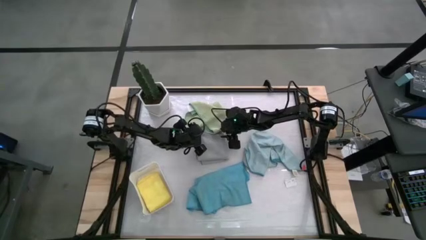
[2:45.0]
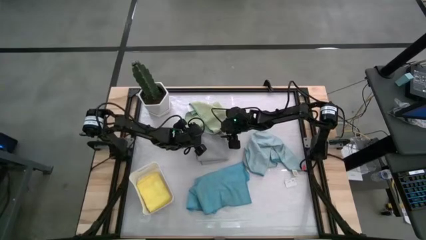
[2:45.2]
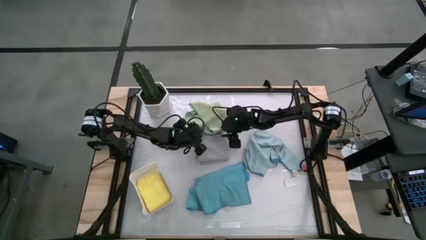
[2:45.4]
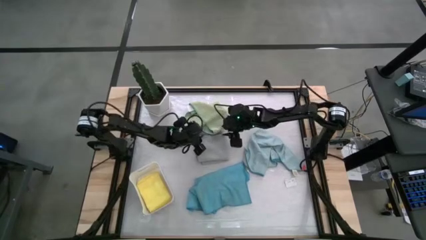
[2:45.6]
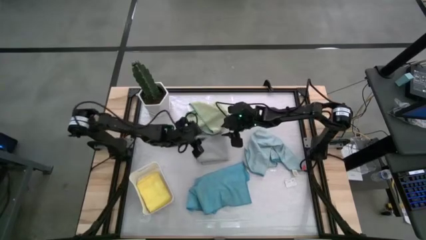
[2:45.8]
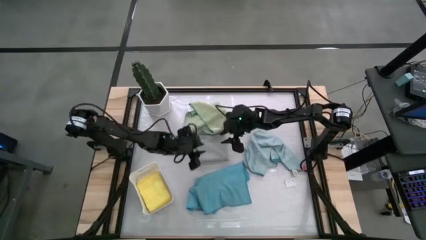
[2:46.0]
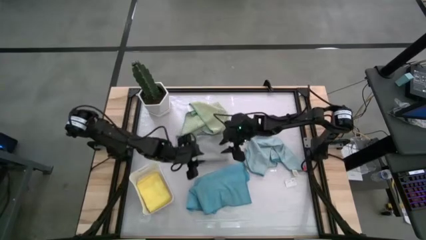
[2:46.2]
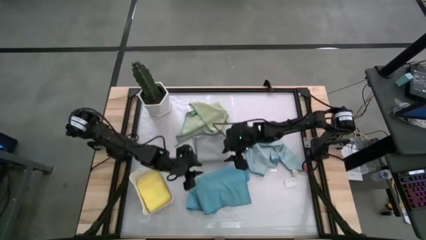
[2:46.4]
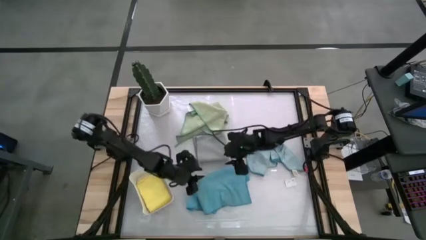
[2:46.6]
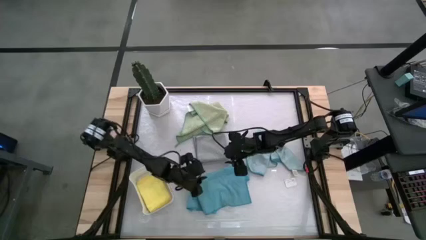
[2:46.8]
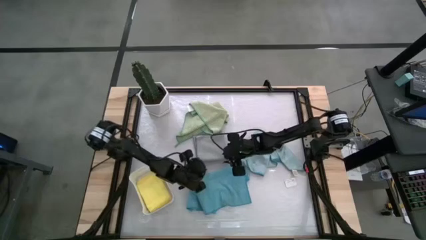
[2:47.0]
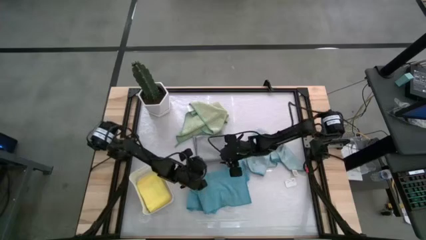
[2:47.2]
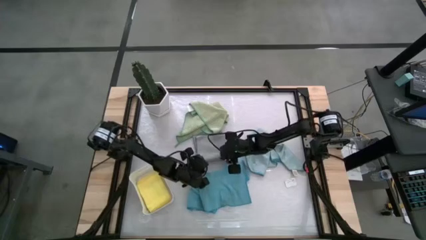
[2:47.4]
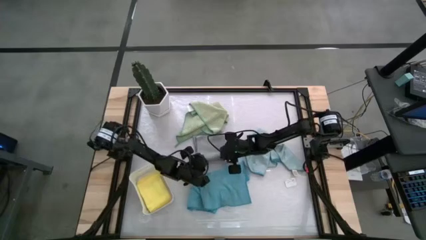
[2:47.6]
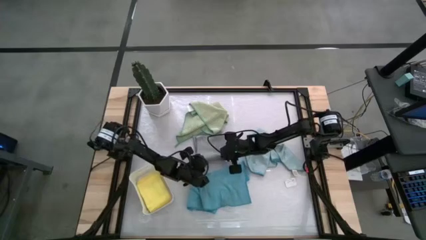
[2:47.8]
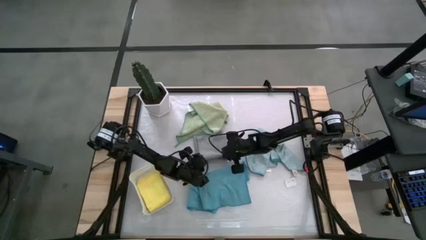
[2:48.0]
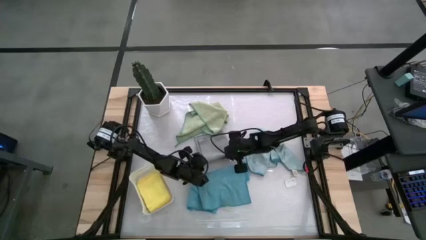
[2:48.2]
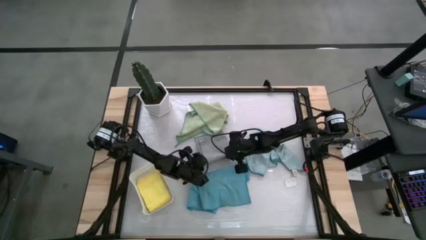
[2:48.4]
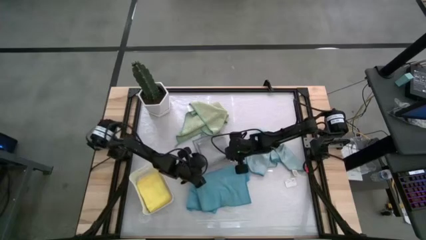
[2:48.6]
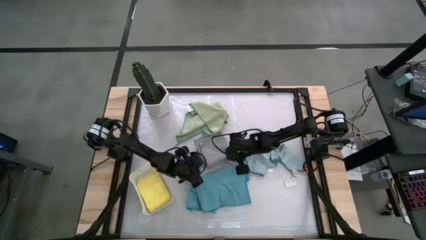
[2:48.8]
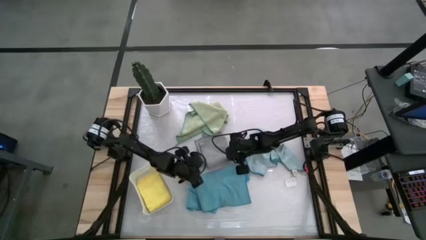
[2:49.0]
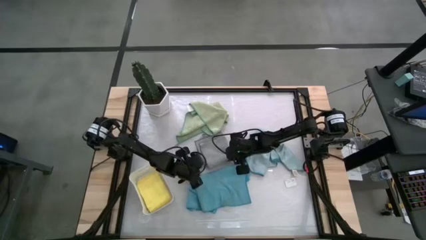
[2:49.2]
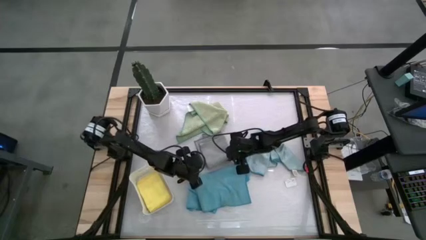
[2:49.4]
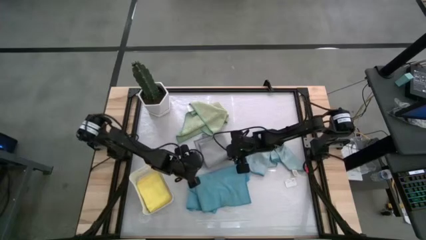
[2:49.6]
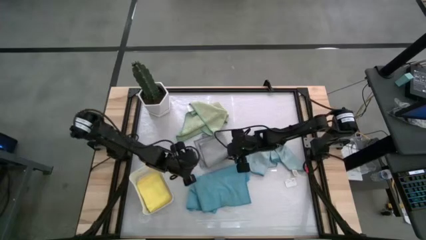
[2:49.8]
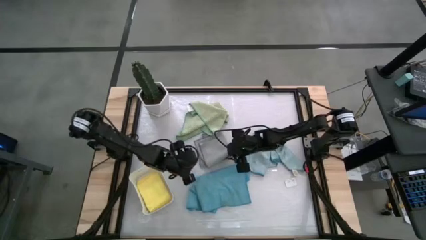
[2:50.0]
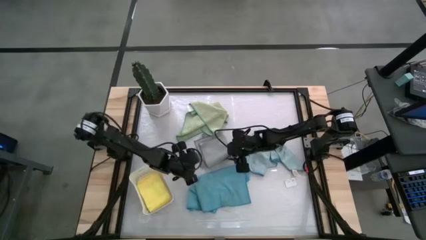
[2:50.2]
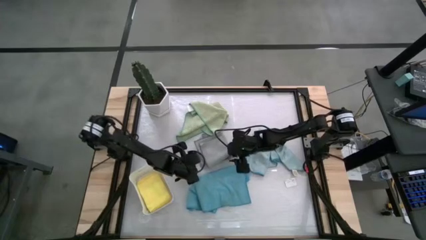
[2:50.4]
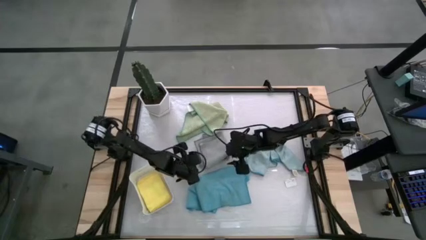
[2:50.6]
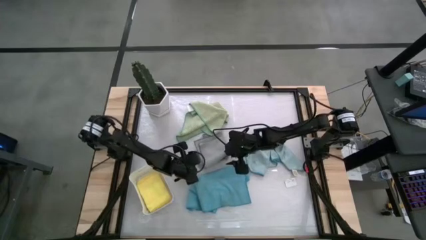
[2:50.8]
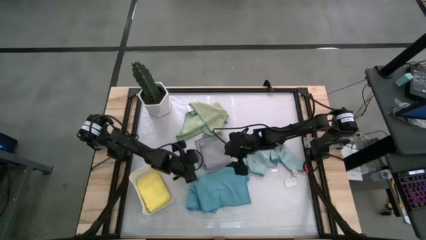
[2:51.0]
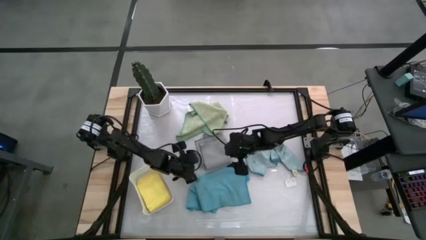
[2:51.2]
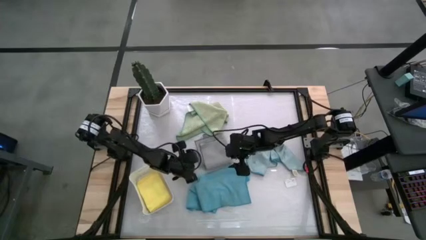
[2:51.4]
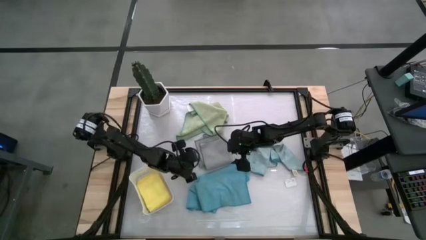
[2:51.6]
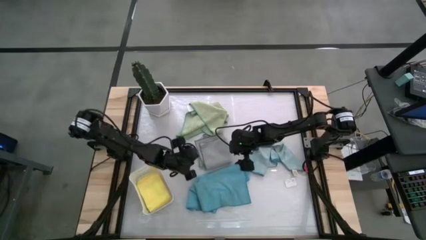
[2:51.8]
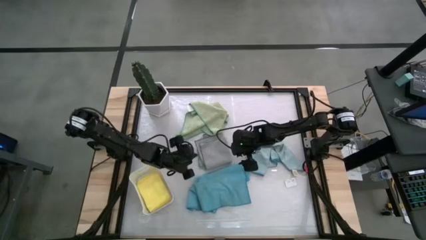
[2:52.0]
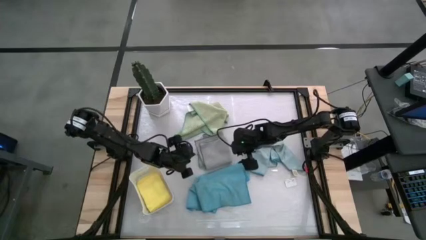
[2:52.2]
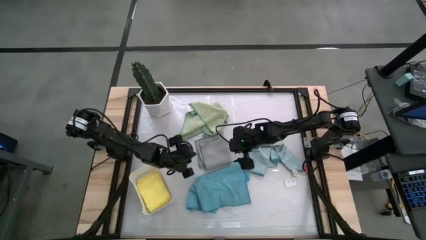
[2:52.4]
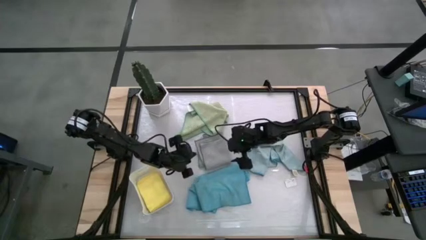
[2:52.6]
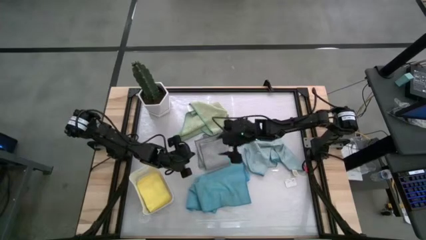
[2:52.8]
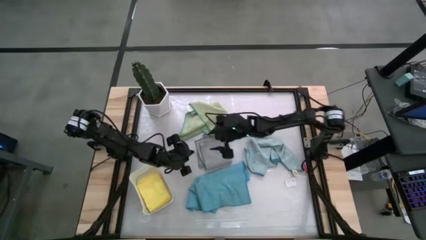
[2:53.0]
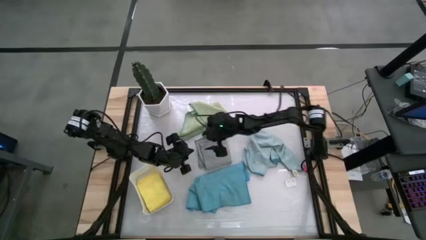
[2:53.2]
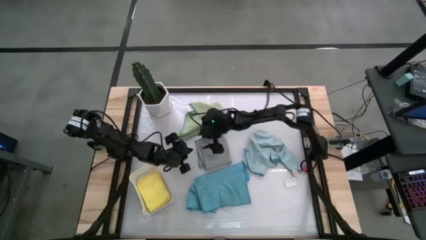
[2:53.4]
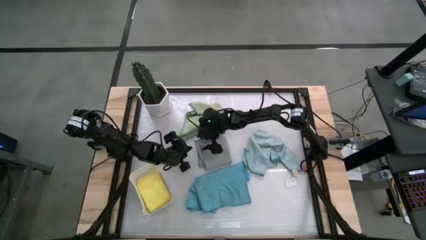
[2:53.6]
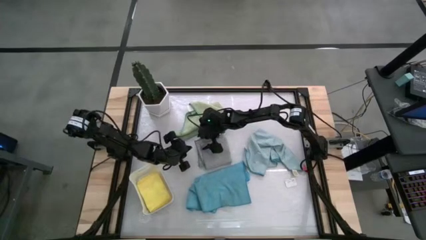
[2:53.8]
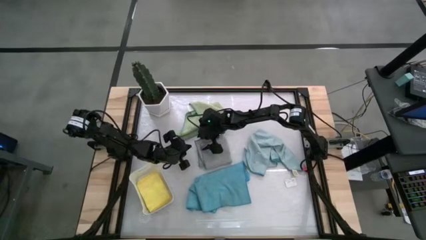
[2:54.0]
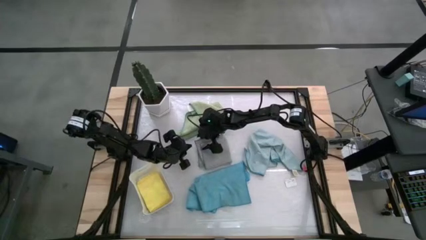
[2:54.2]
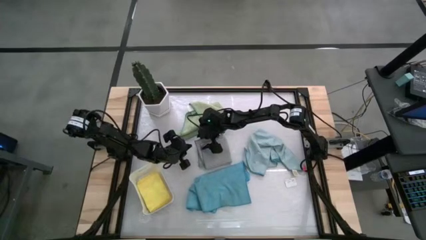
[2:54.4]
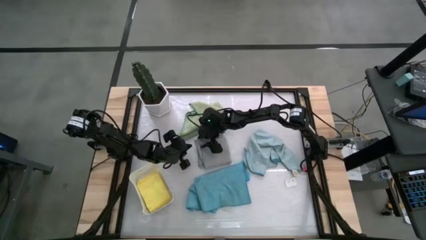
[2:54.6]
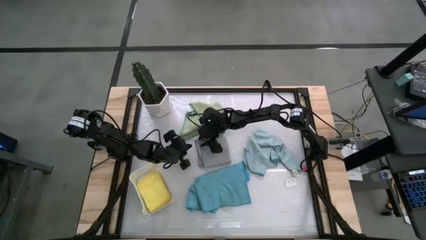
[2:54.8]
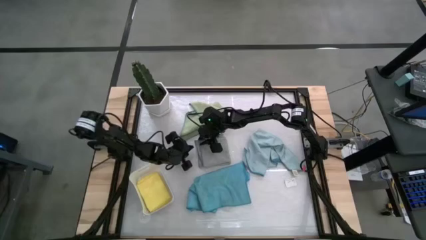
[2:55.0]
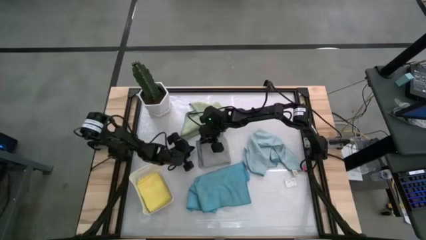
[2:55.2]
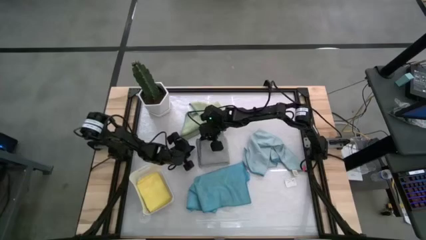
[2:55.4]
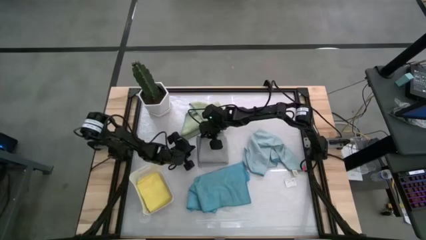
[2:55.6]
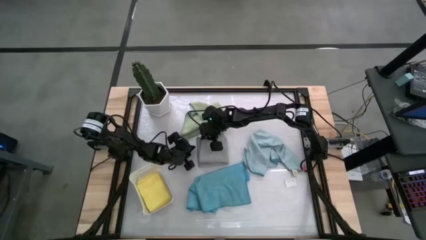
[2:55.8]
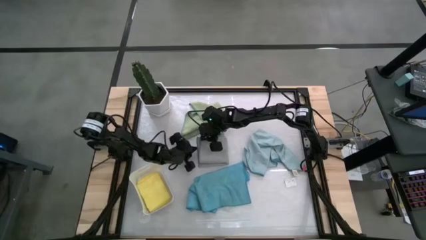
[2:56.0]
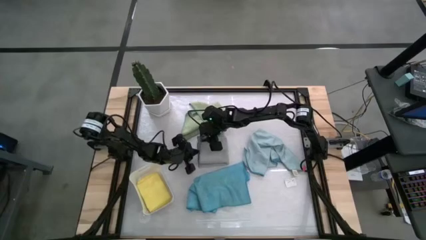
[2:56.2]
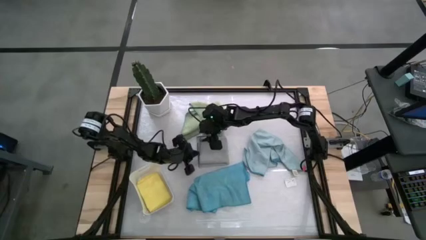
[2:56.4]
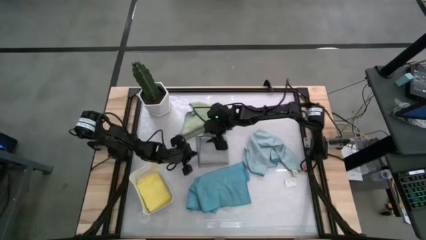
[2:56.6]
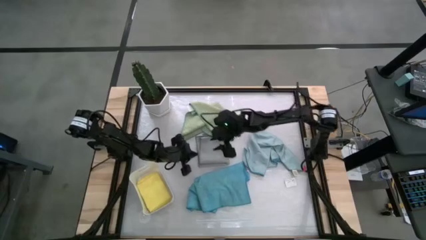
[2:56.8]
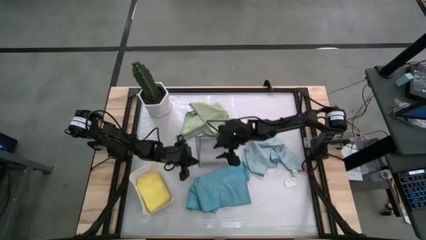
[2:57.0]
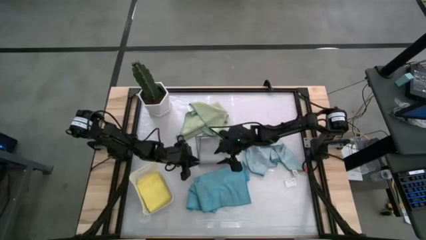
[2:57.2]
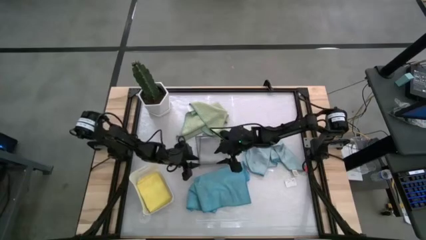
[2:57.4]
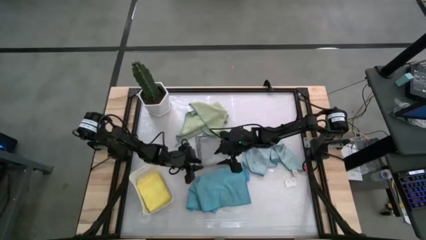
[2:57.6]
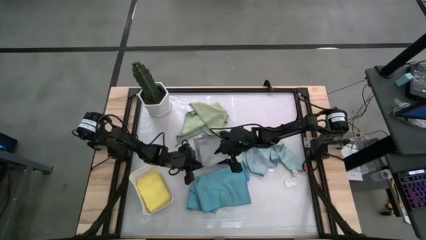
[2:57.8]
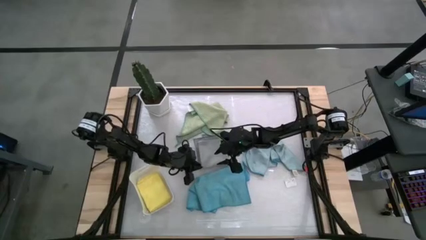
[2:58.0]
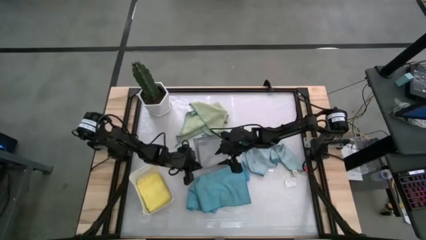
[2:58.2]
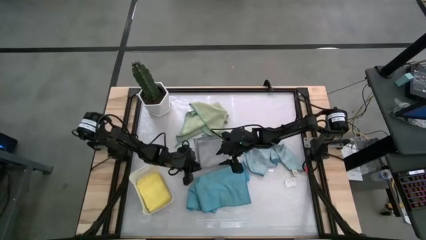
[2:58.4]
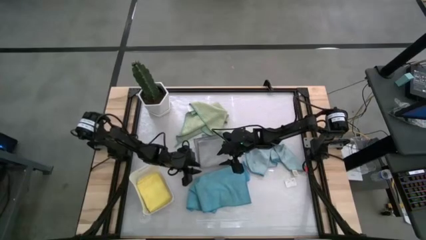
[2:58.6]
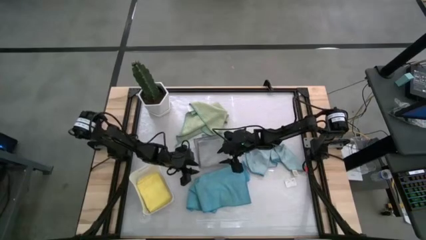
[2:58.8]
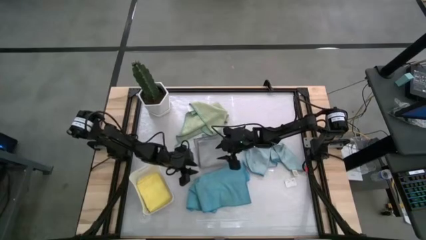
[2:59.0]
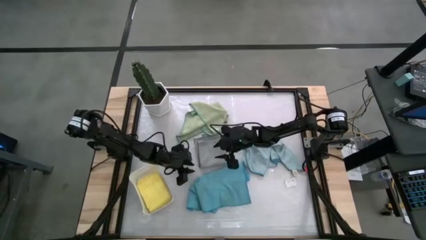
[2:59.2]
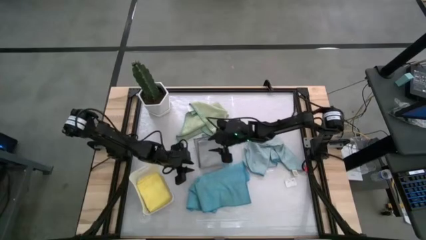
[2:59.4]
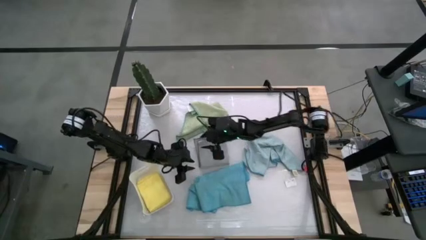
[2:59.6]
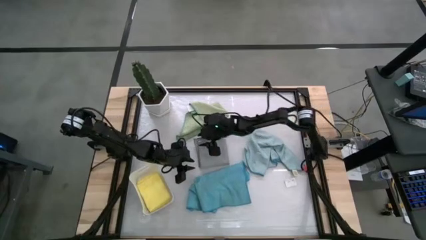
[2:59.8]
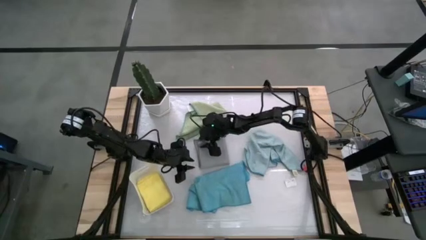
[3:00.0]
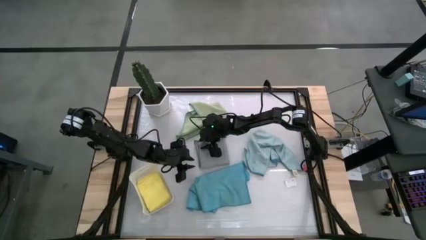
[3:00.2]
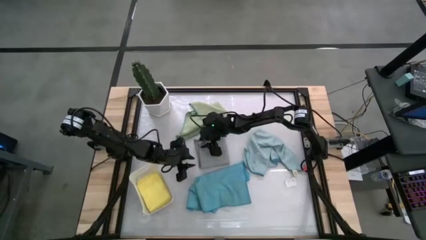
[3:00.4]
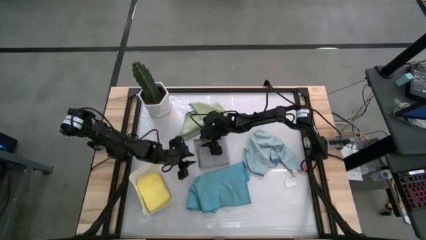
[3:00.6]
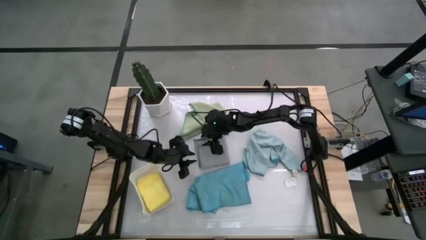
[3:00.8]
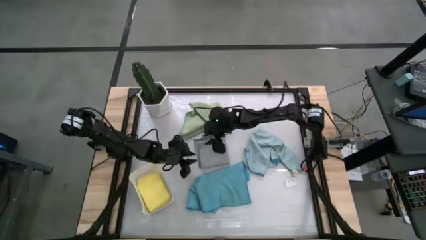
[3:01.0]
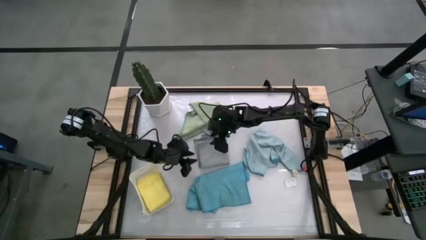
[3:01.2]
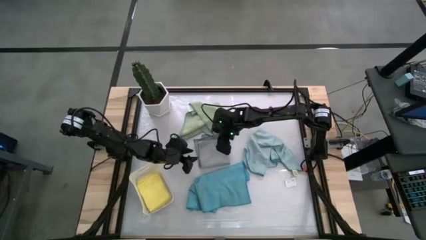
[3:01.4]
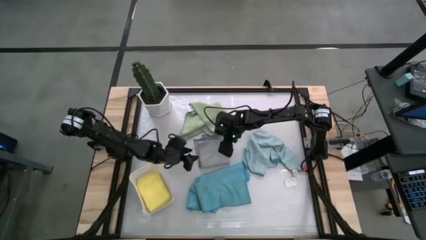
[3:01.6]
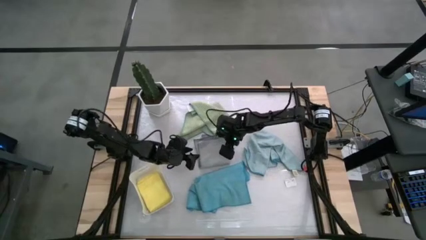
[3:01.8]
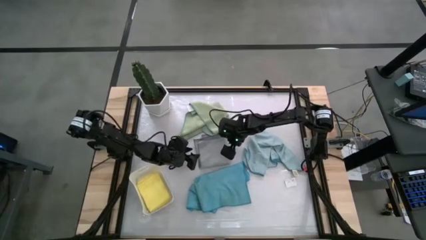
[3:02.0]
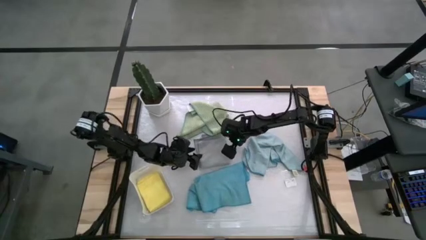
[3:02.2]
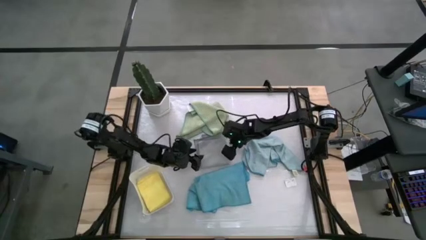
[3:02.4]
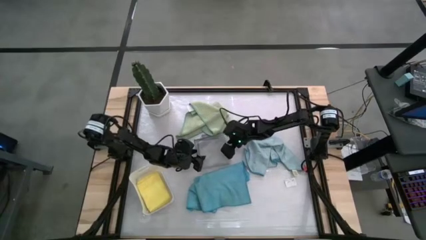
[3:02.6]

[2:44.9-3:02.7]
Task: Fold microfiber towels
Fold the gray microfiber towel
